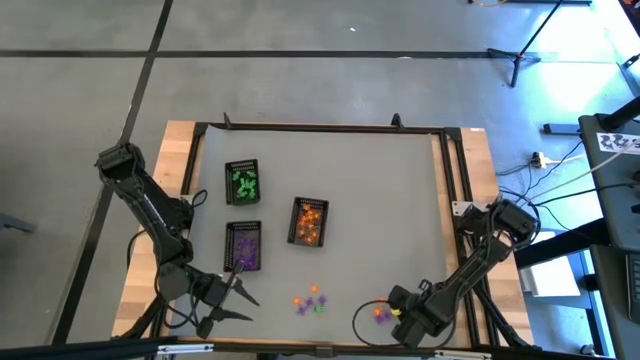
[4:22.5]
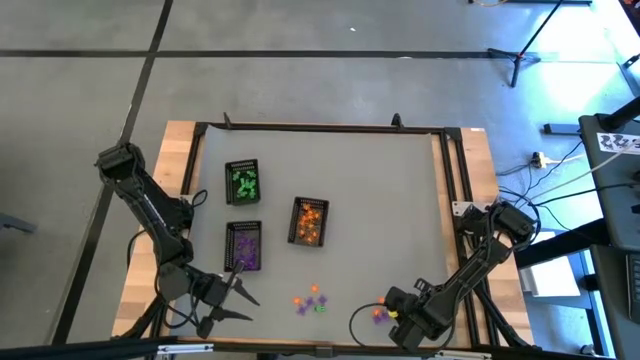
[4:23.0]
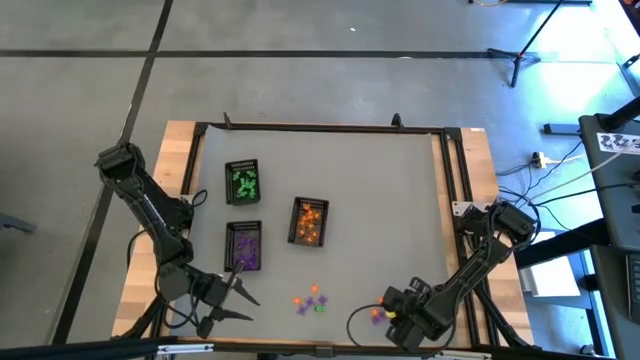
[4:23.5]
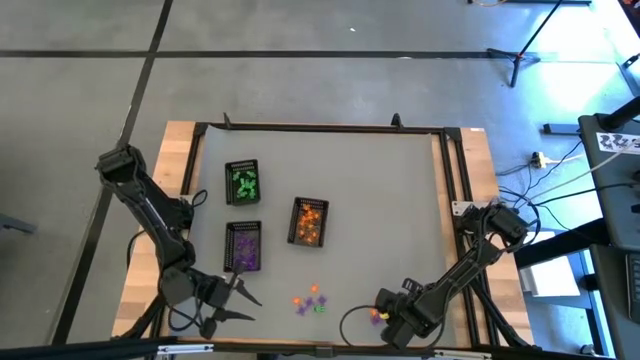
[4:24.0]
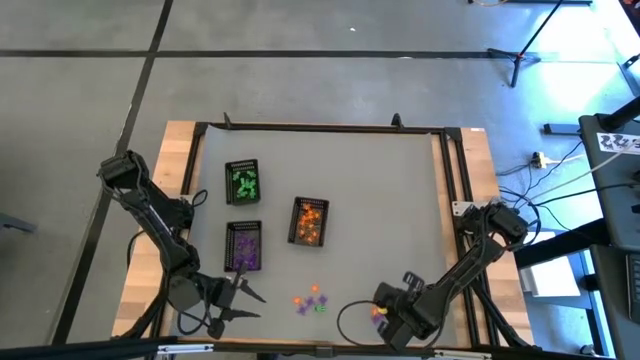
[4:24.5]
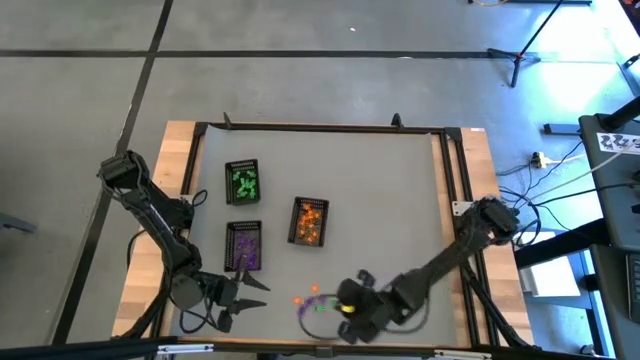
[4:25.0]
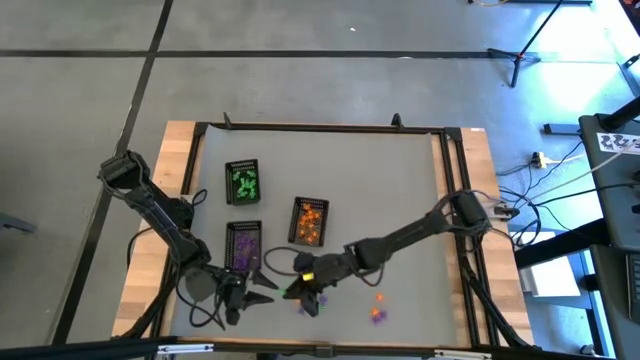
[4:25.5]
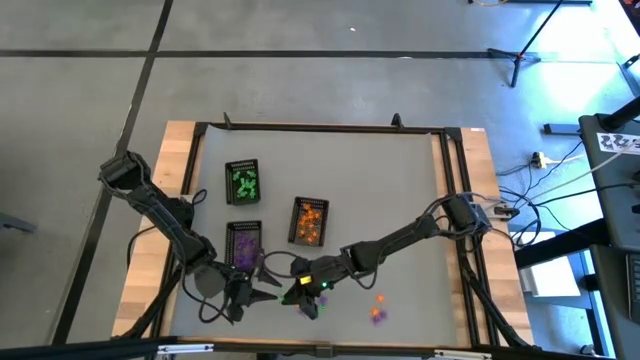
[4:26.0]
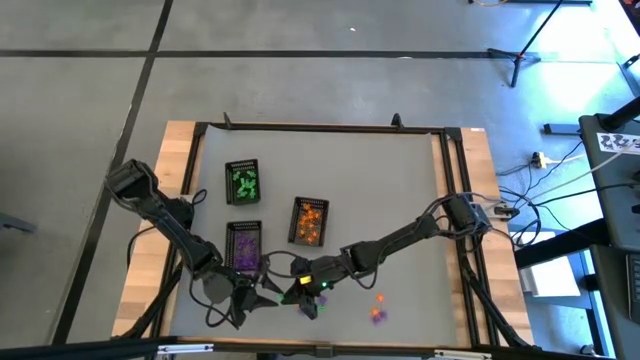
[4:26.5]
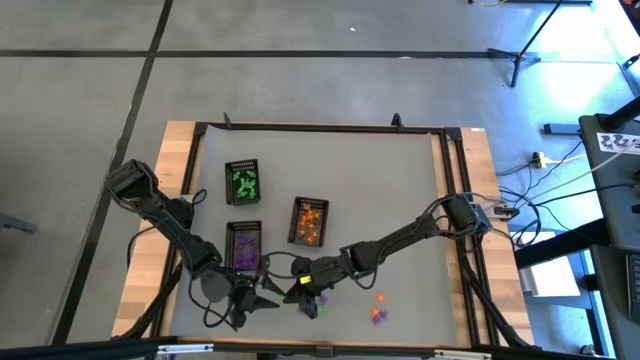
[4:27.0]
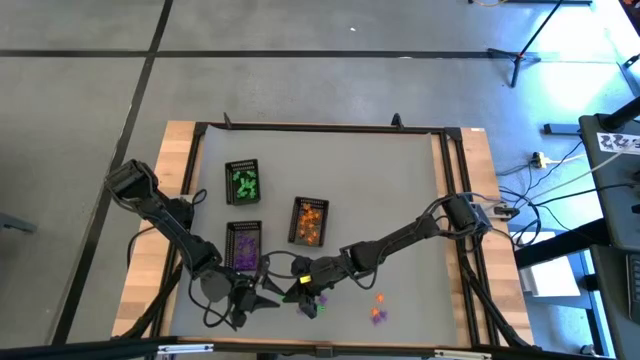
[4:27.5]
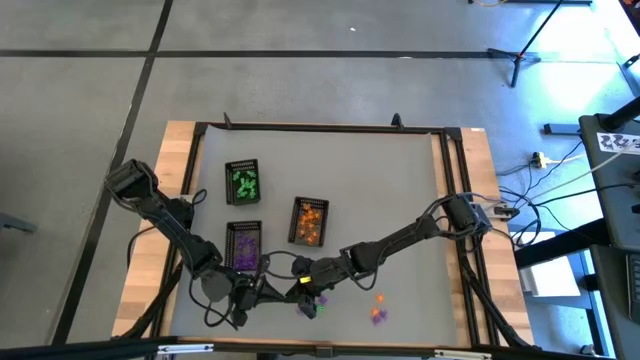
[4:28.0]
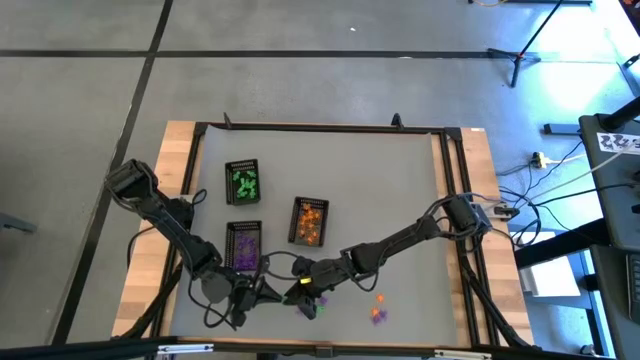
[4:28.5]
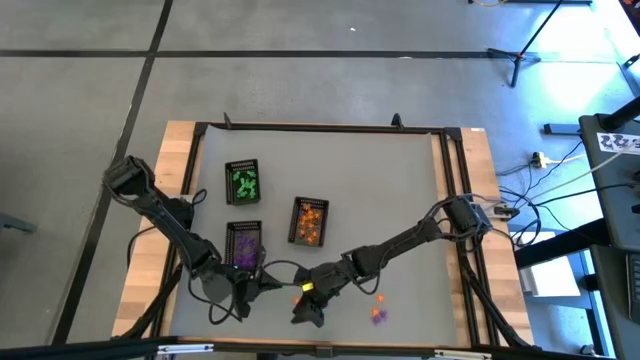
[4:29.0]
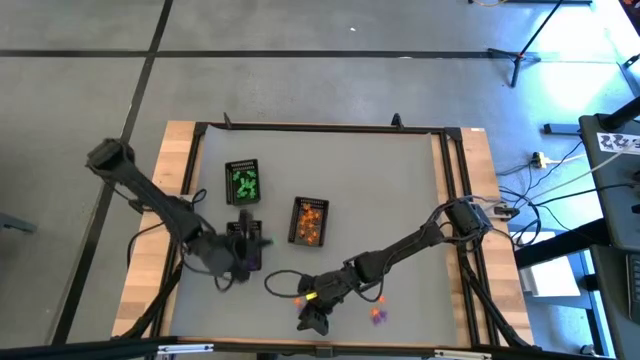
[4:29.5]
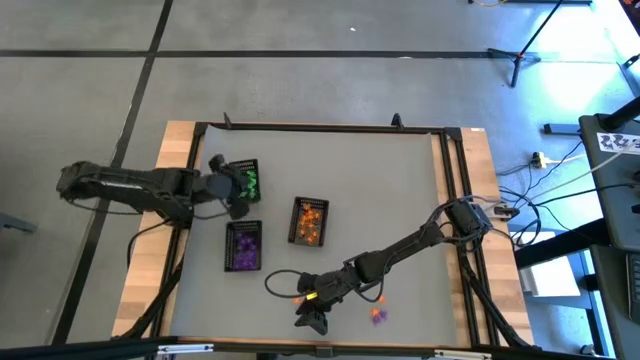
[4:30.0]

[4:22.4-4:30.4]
Task: Sort Halloween decoration
Put the green alien toy into the top left black basket

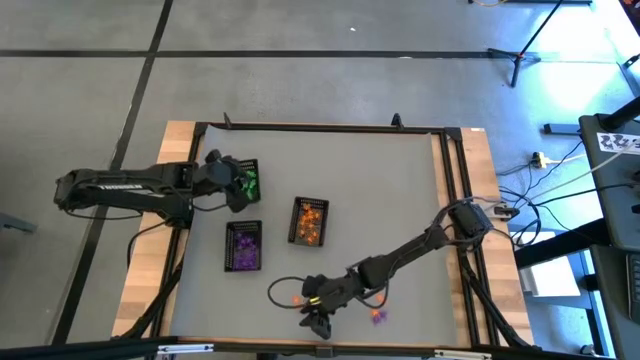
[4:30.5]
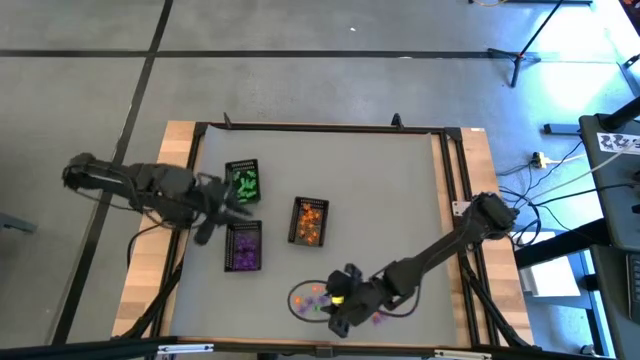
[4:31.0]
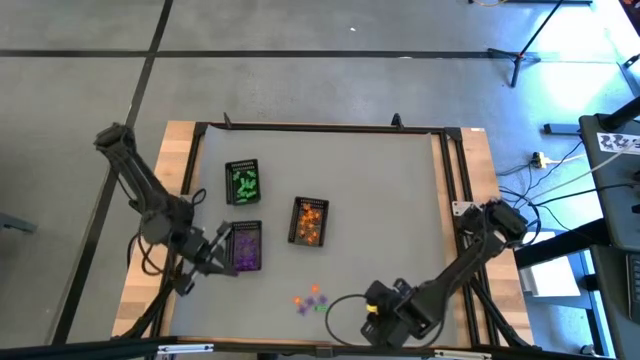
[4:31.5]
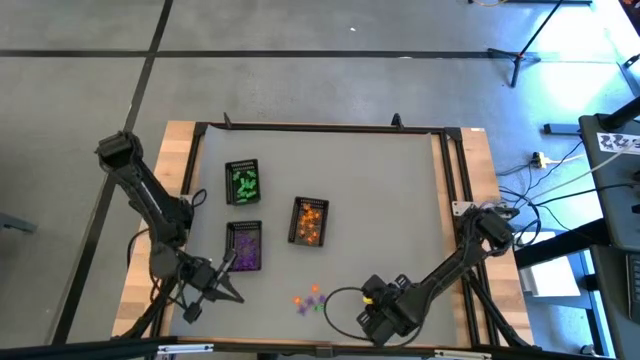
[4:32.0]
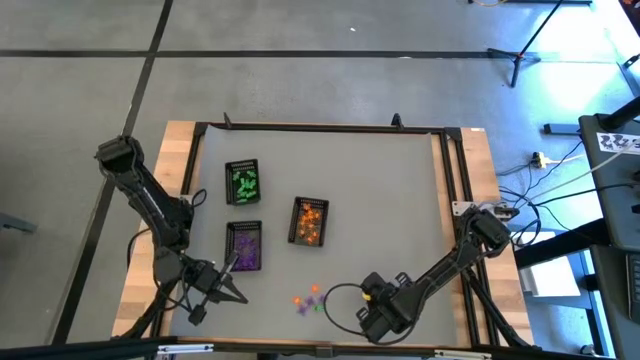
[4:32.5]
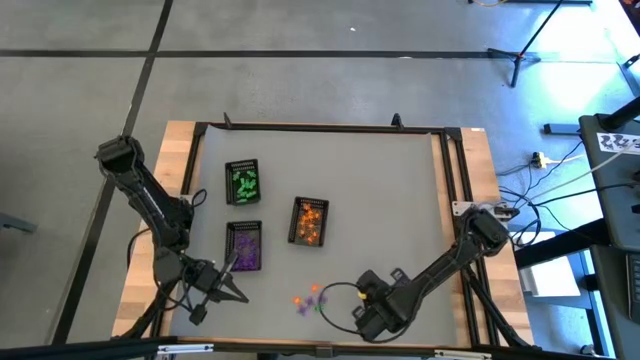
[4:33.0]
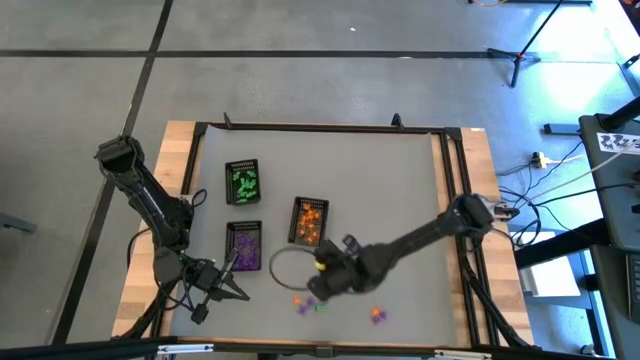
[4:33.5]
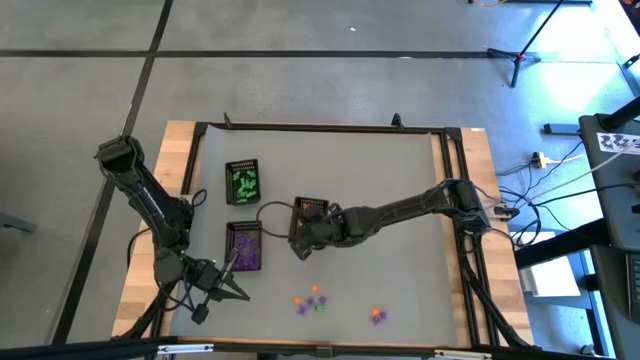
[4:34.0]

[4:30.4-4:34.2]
Put the orange spider toy into the bottom right black basket

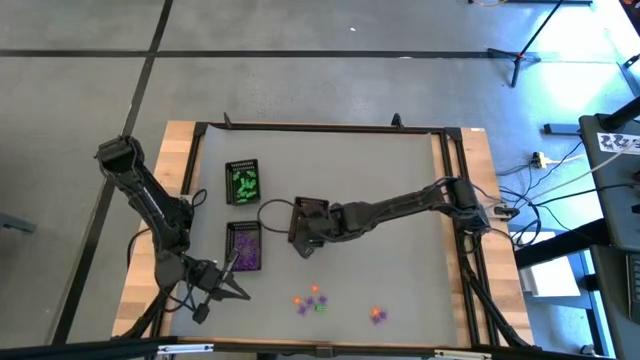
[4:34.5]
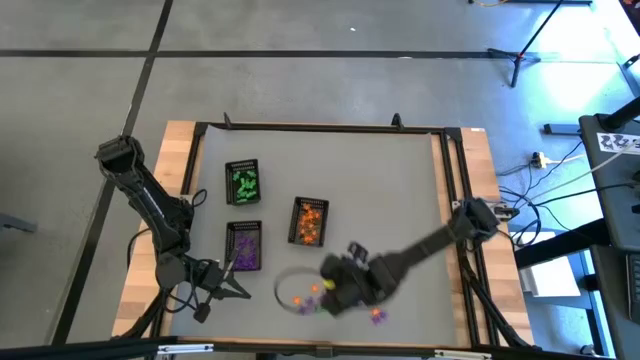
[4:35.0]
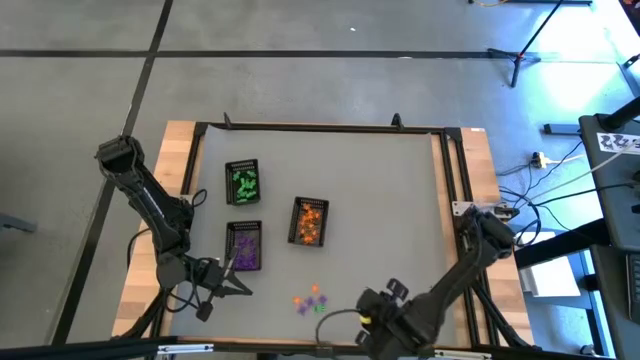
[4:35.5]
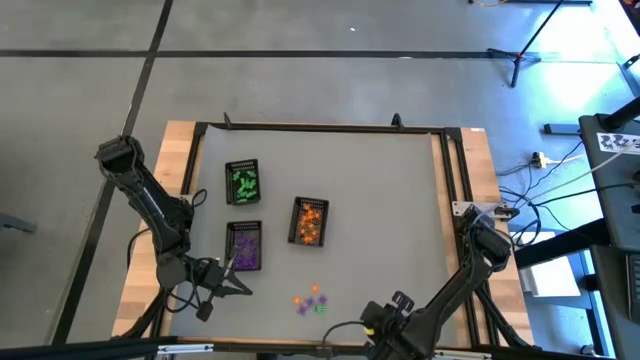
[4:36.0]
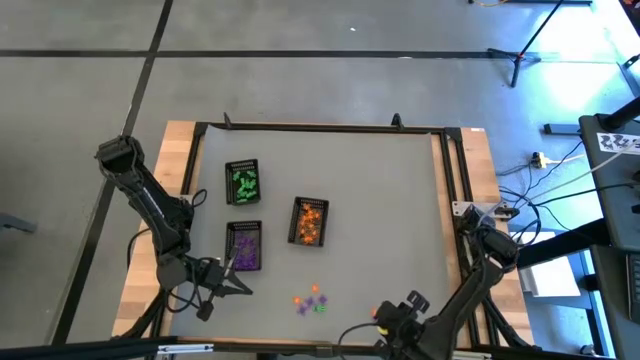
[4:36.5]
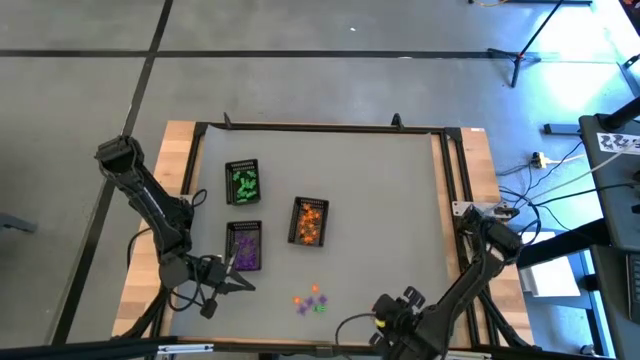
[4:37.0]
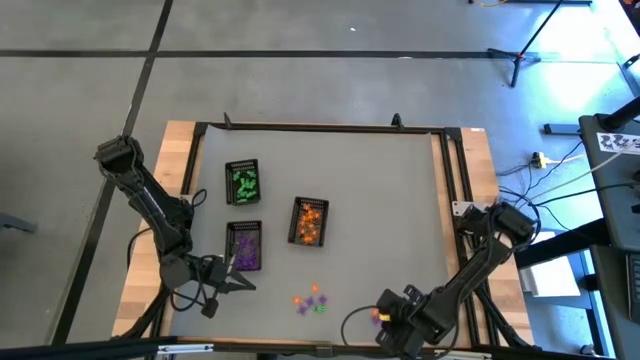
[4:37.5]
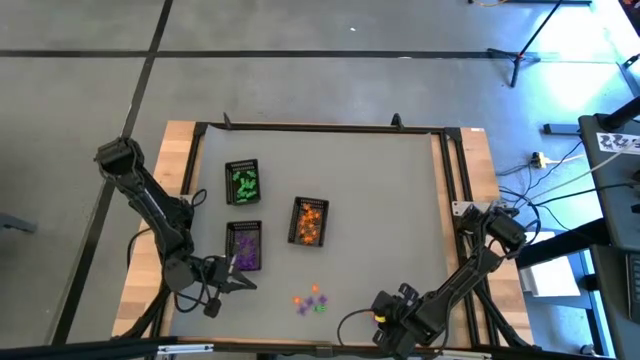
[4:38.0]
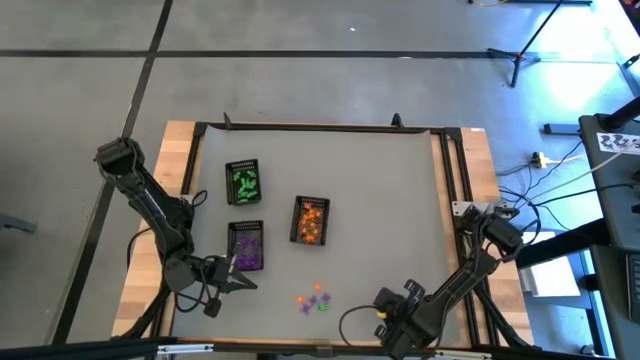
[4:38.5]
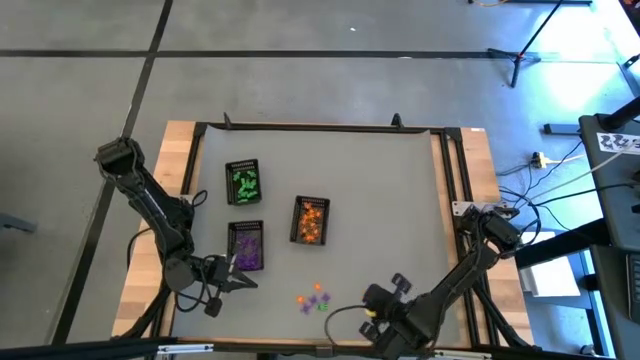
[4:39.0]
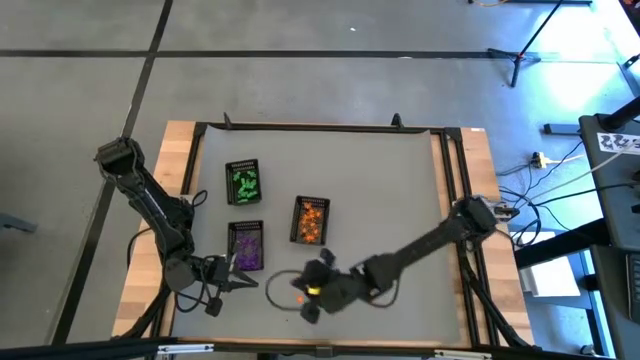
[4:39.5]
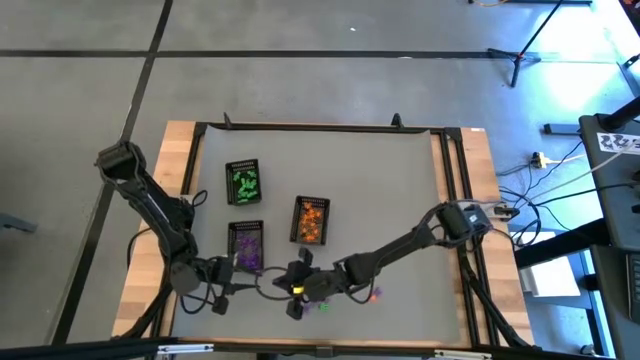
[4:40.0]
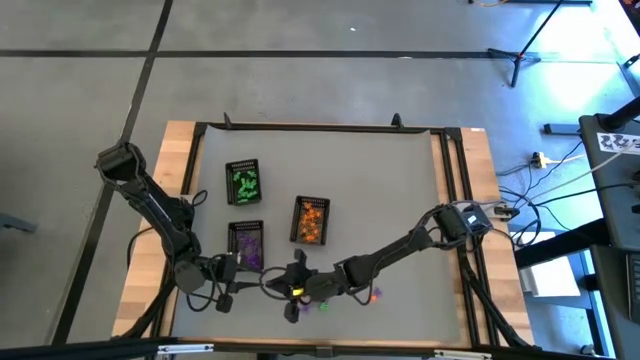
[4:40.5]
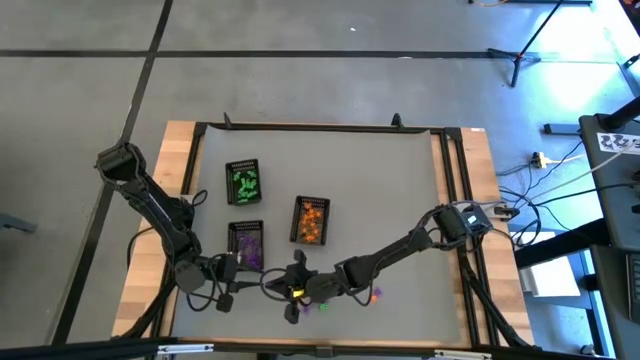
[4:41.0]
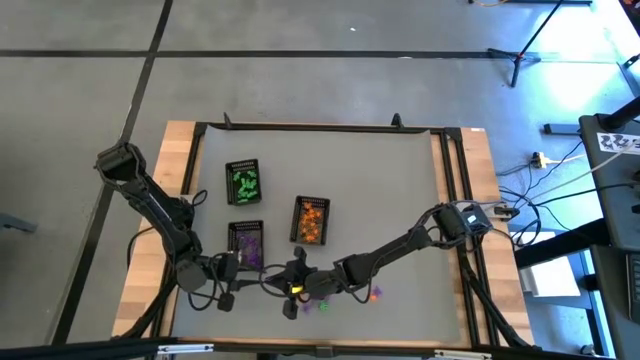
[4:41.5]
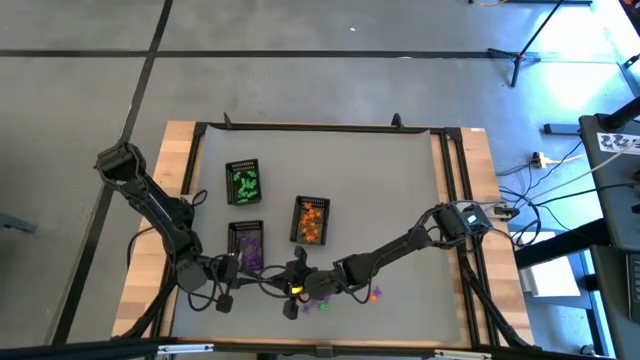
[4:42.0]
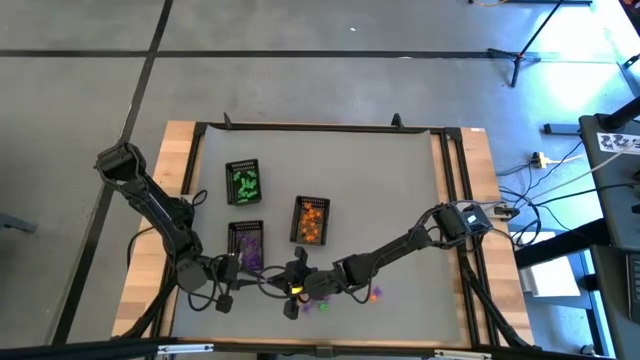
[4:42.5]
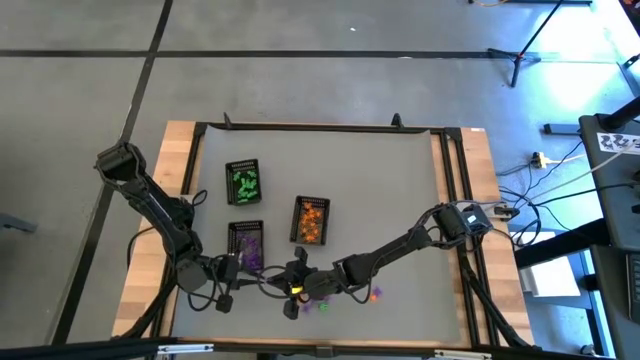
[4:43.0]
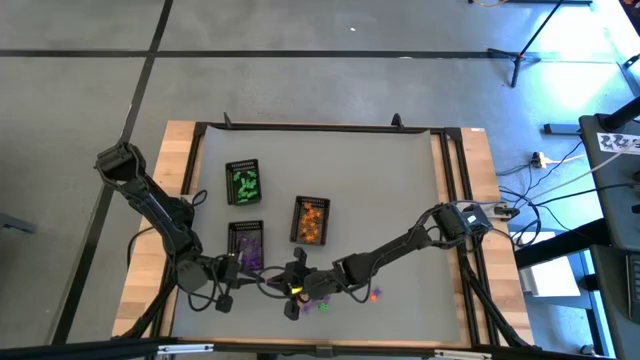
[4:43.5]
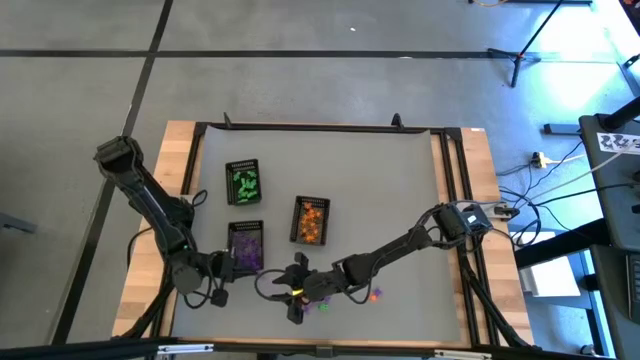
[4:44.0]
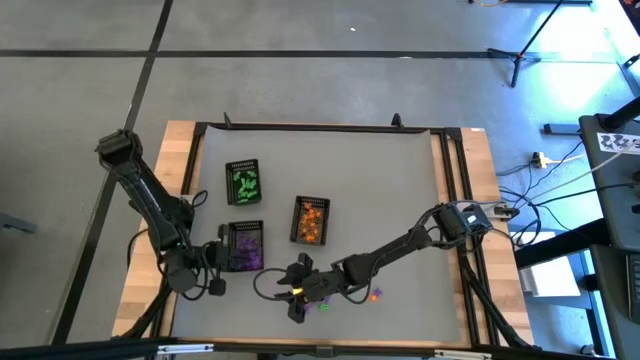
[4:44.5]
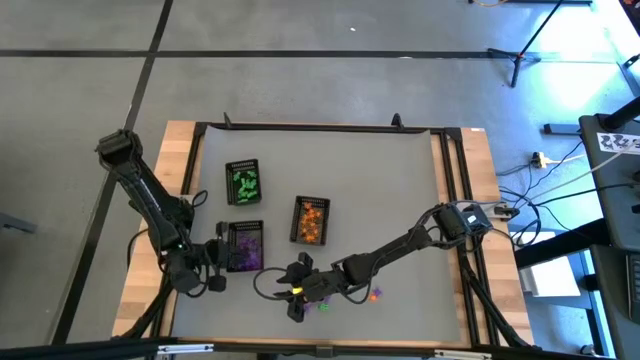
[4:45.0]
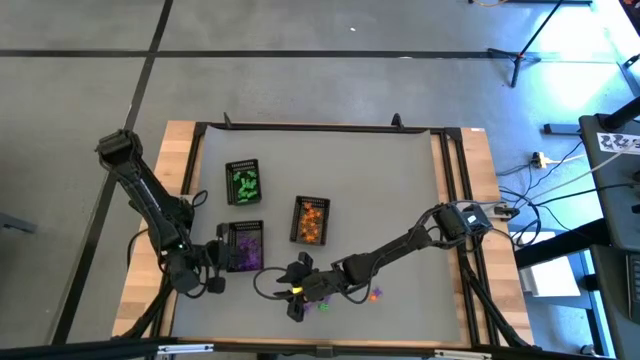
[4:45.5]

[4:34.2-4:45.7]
Put the purple spider toy into the bottom left black basket
